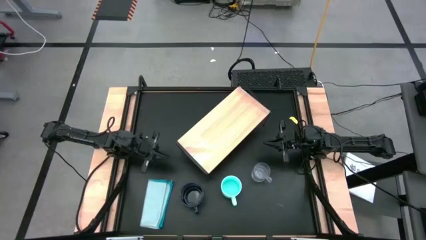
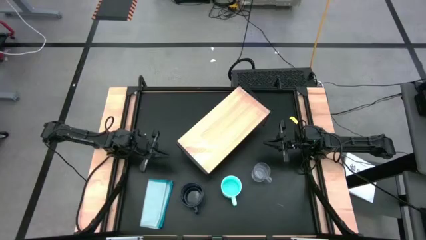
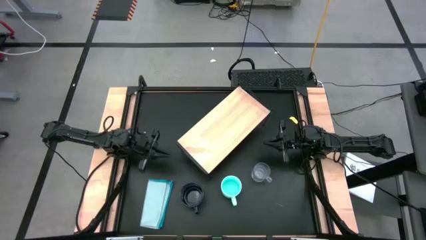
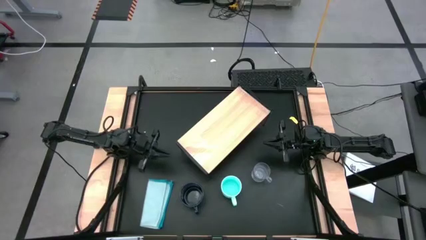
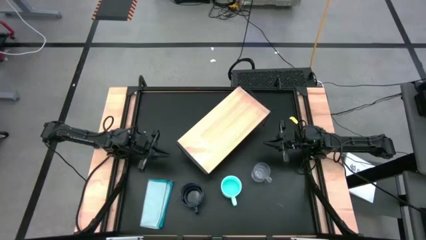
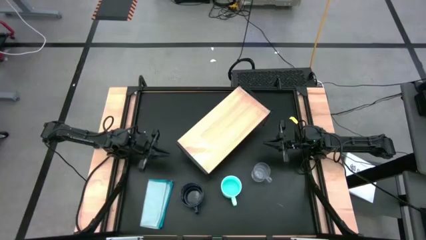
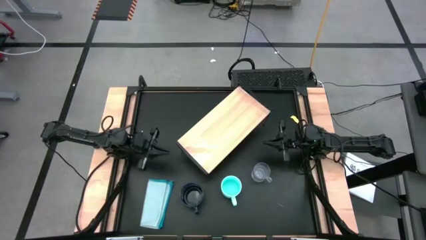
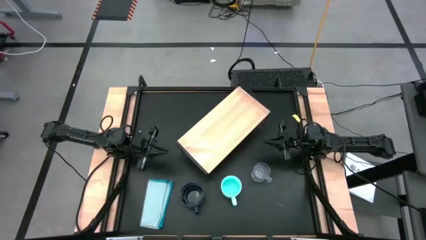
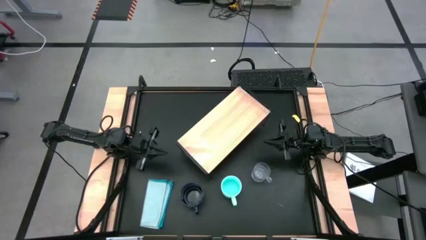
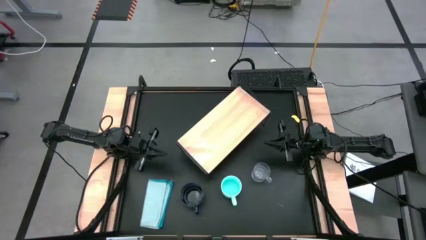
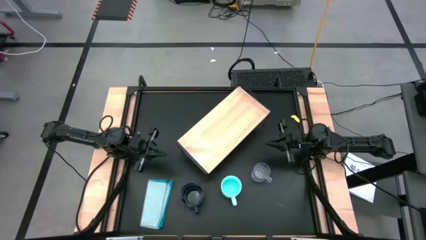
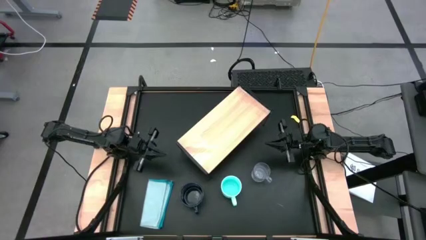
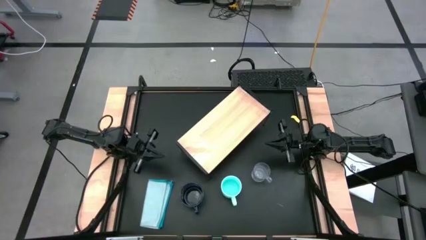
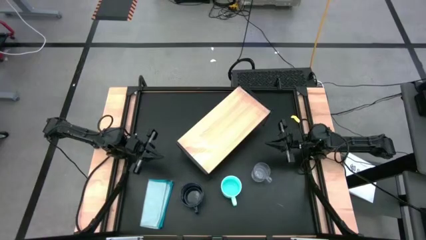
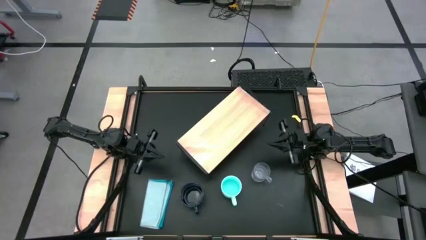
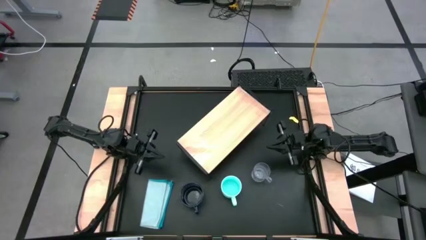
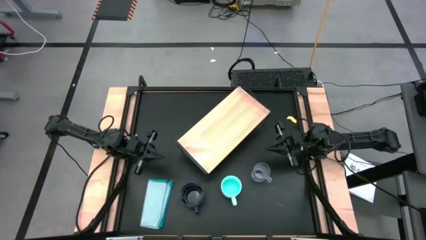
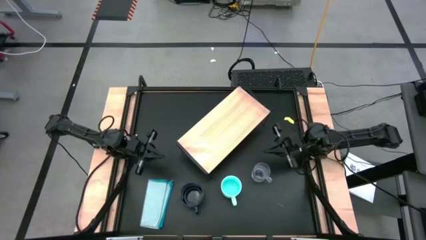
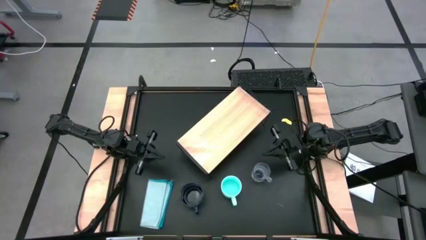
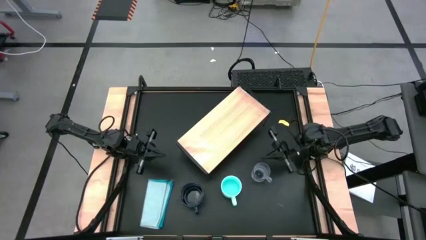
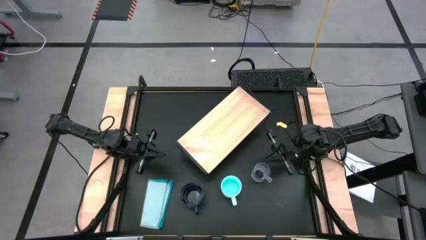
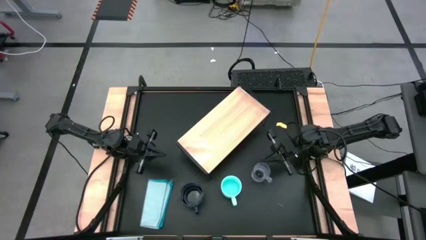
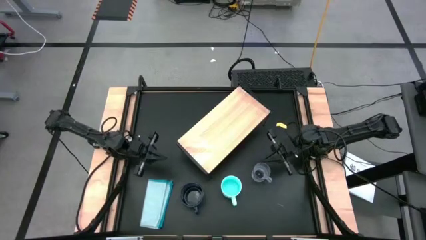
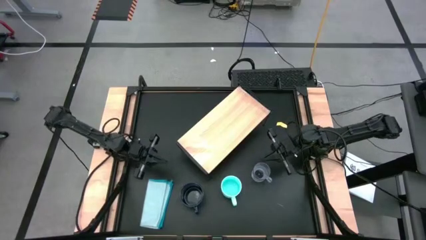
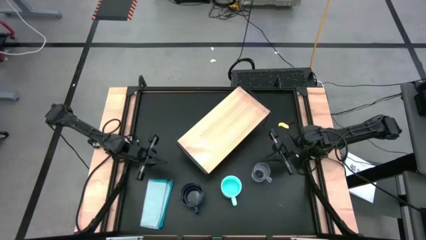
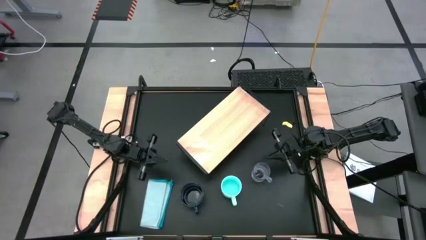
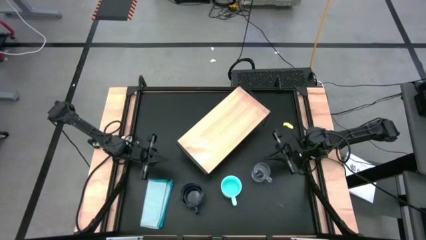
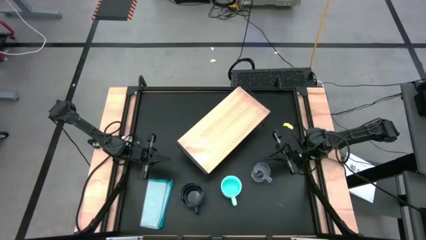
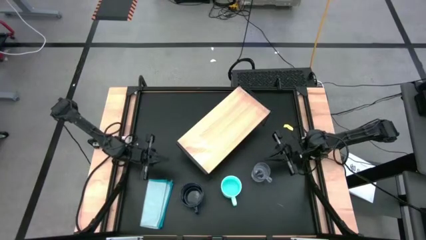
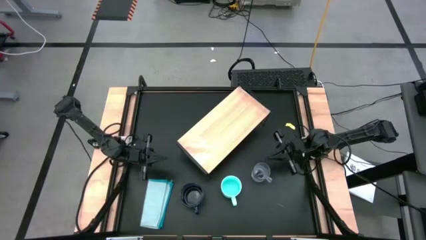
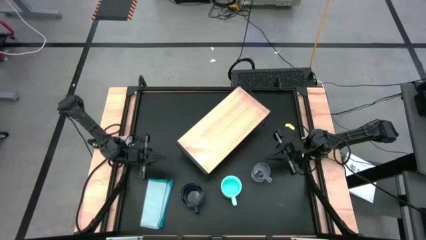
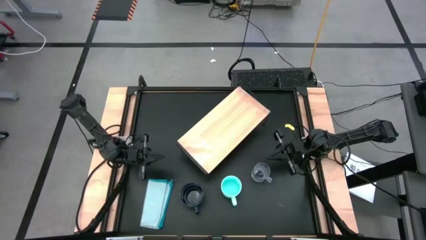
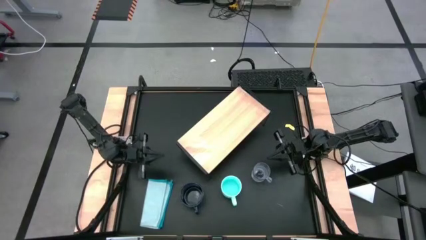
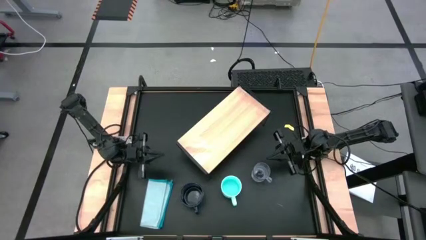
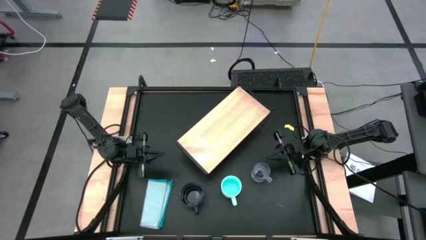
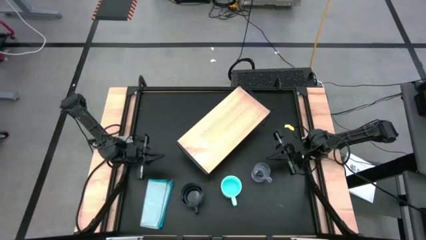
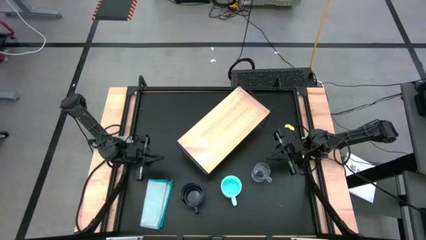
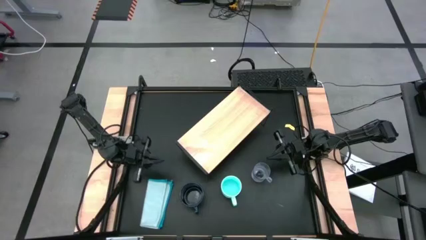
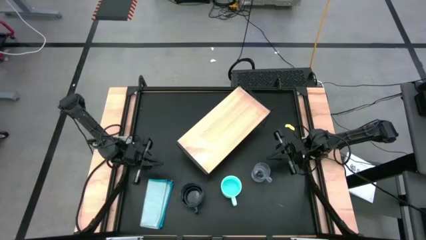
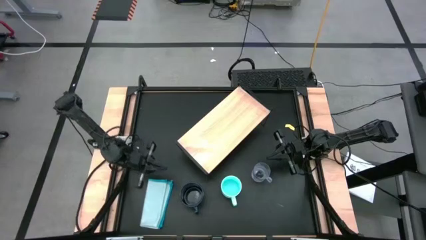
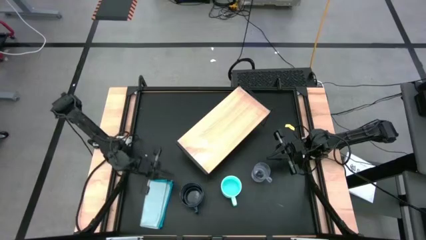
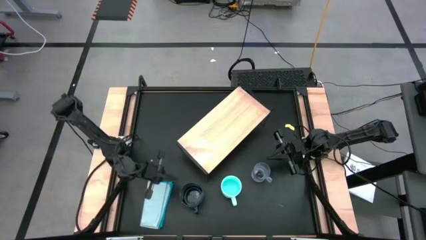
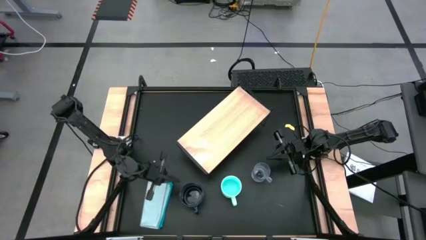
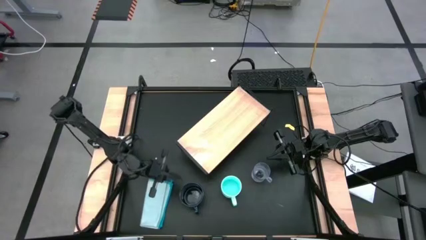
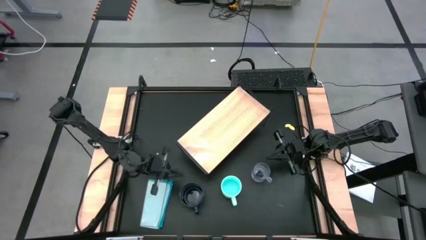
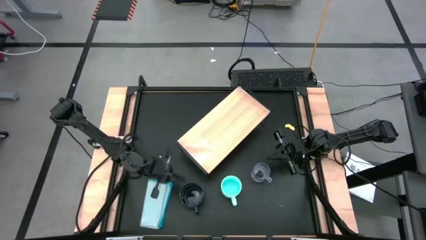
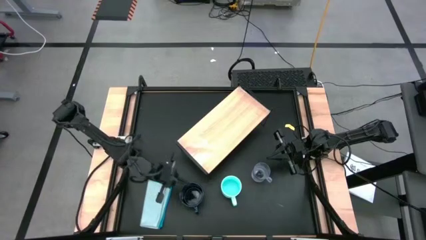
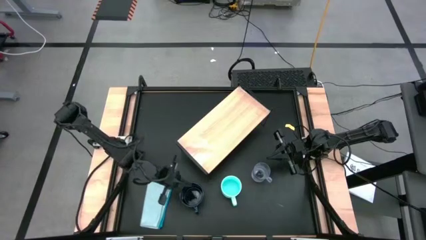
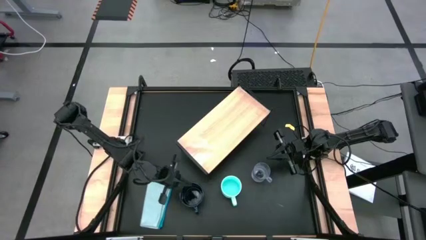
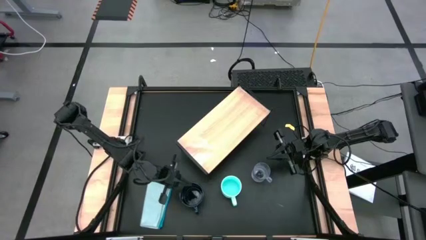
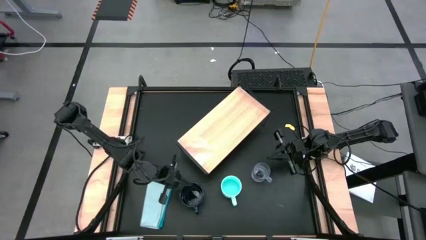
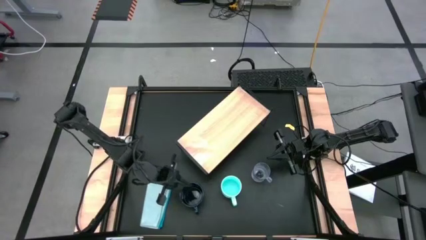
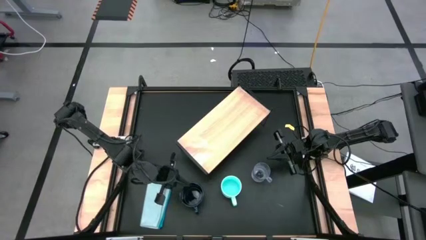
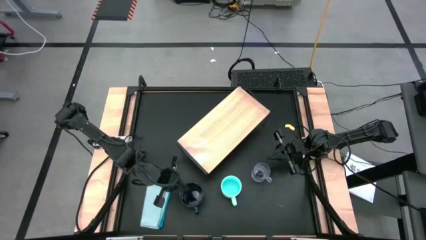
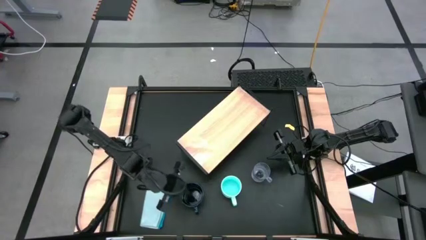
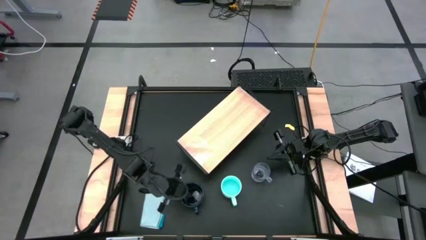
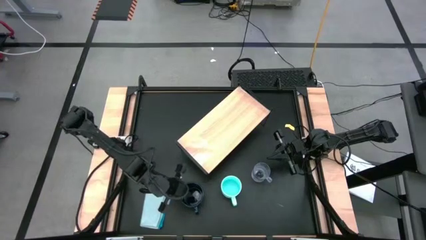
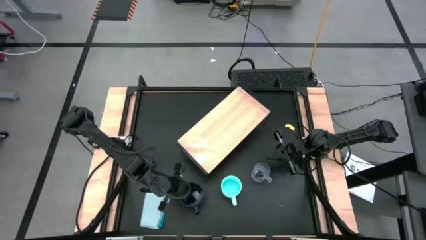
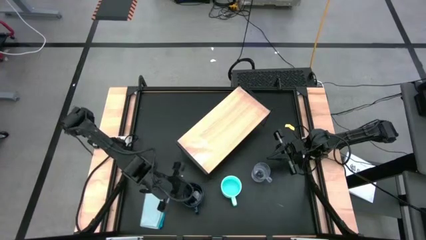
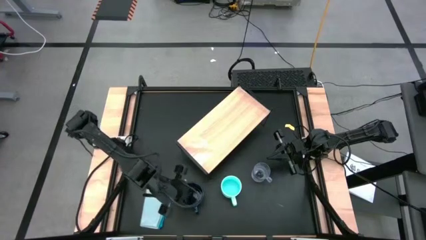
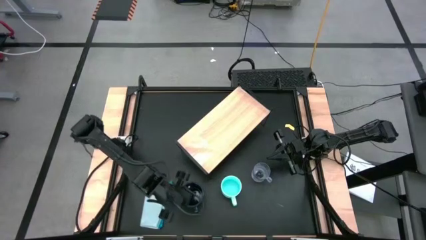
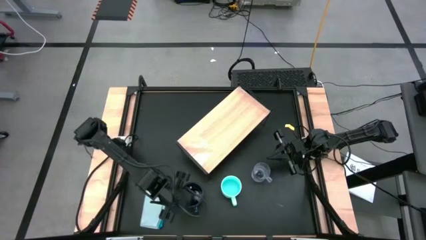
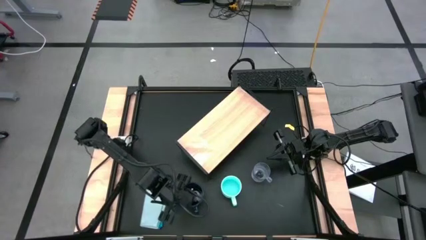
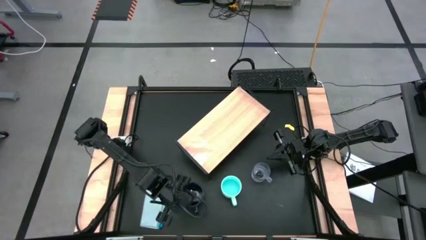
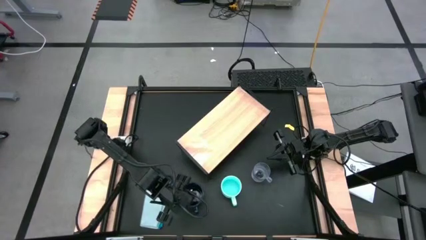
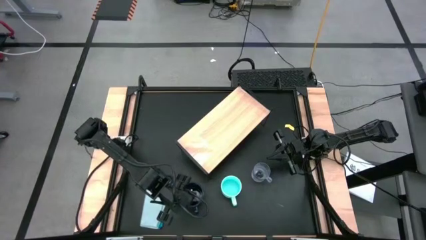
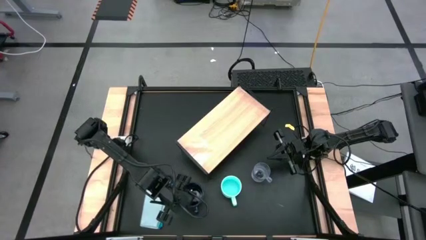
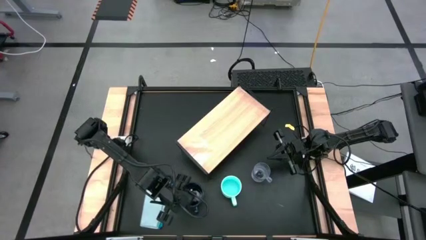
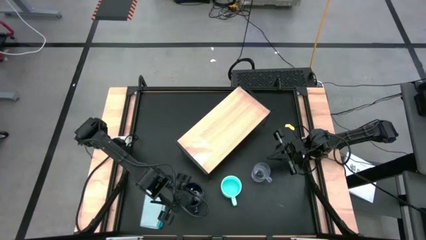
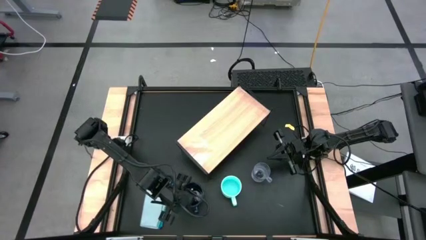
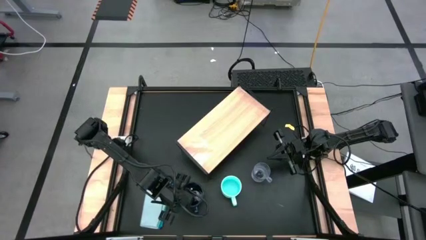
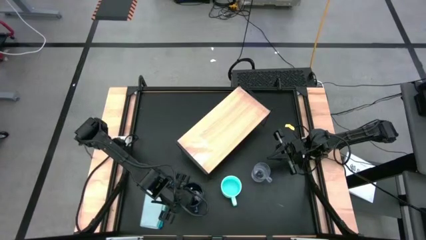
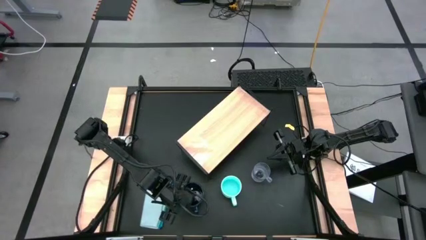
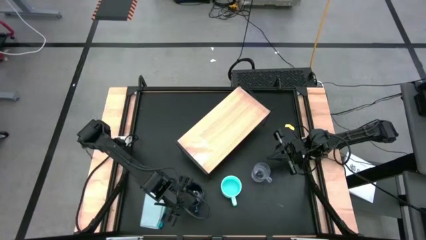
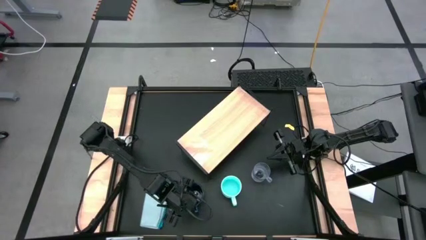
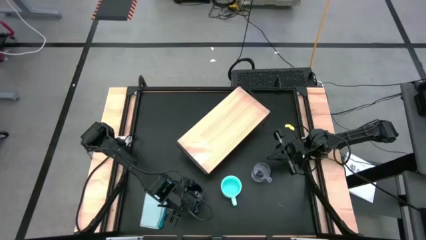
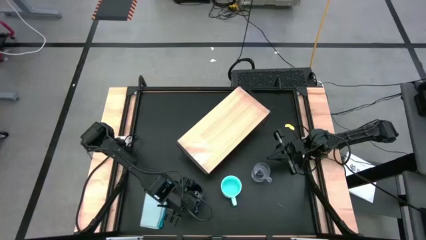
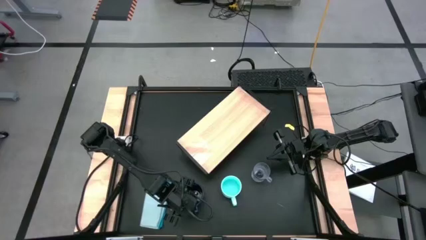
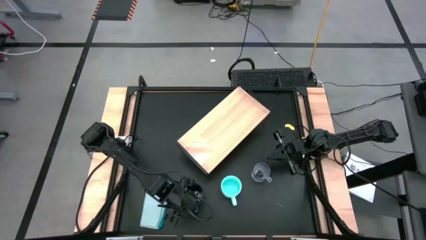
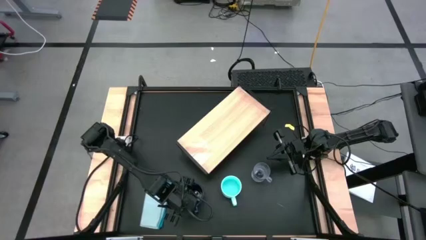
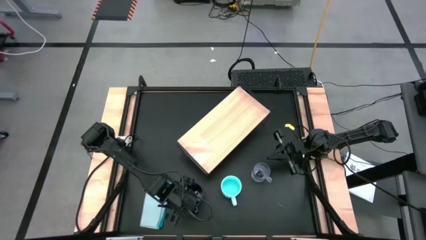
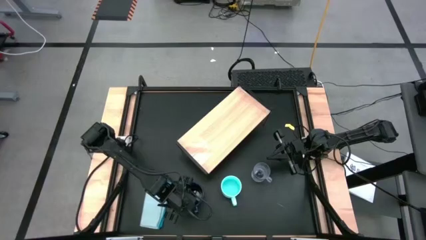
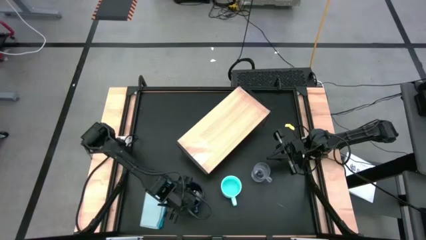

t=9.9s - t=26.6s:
Task: Stack small to large cups/mugs on shelf
Put the dark blue cup on the shelf
